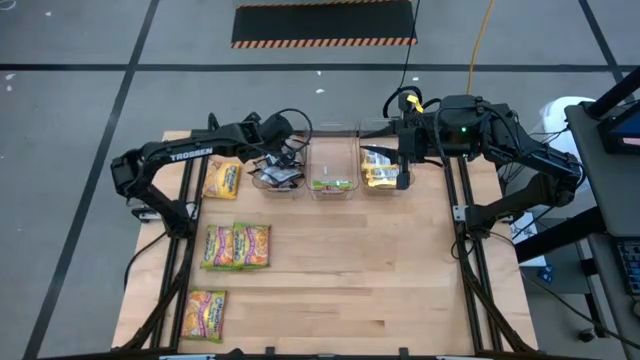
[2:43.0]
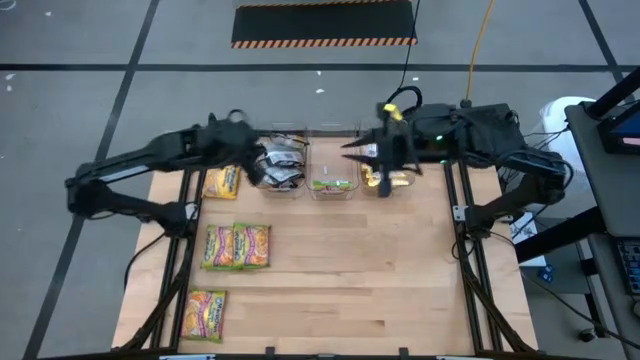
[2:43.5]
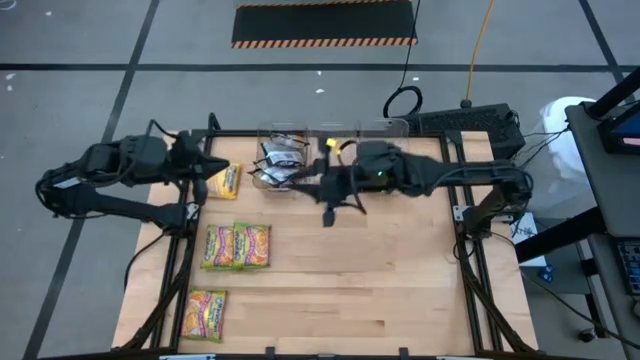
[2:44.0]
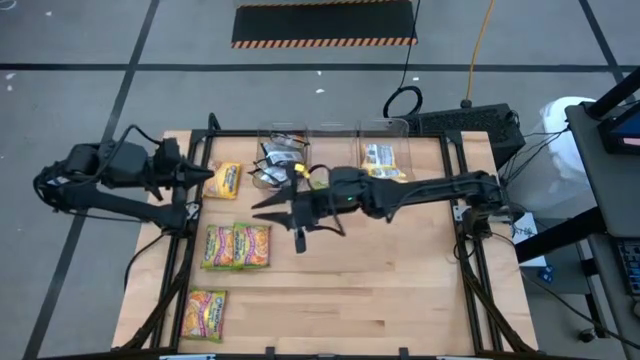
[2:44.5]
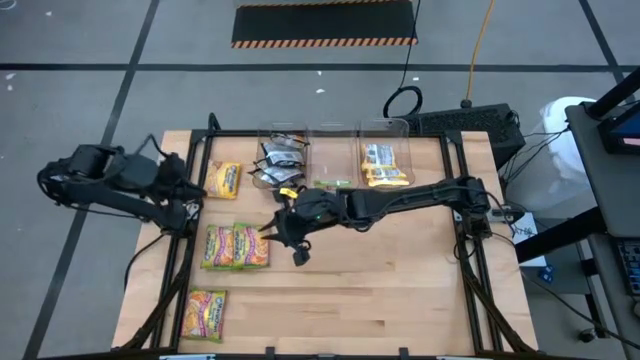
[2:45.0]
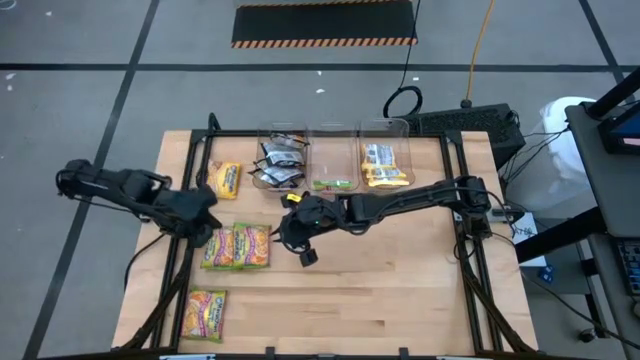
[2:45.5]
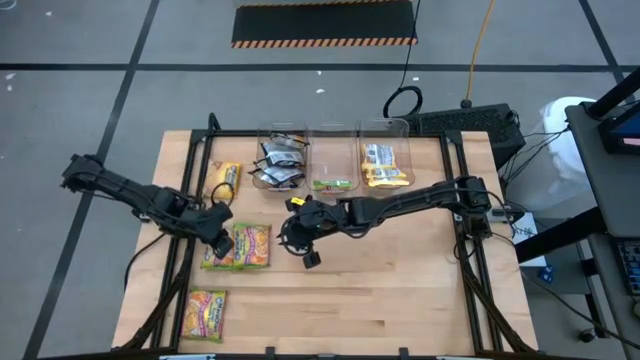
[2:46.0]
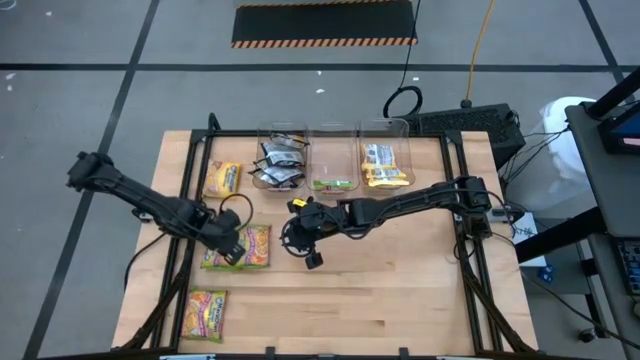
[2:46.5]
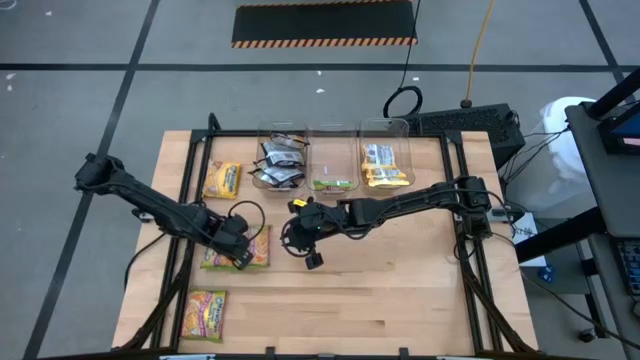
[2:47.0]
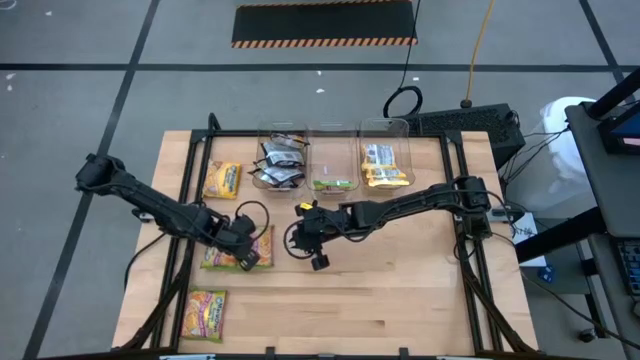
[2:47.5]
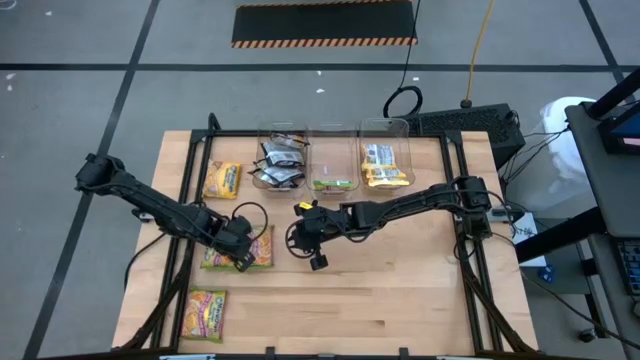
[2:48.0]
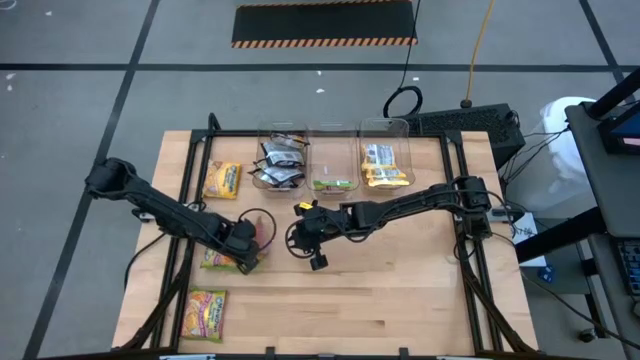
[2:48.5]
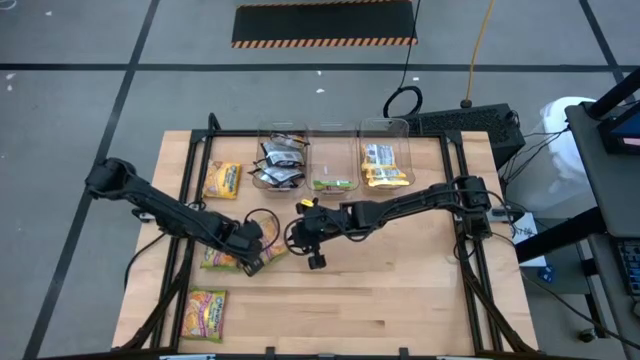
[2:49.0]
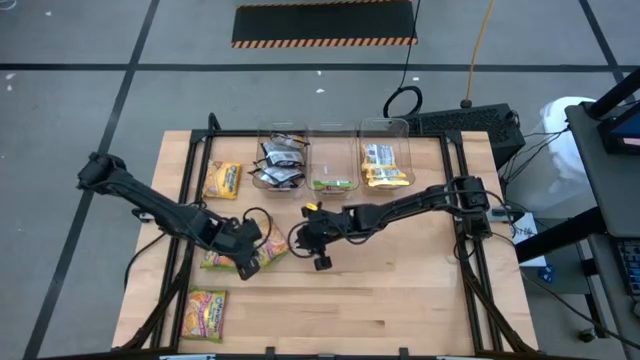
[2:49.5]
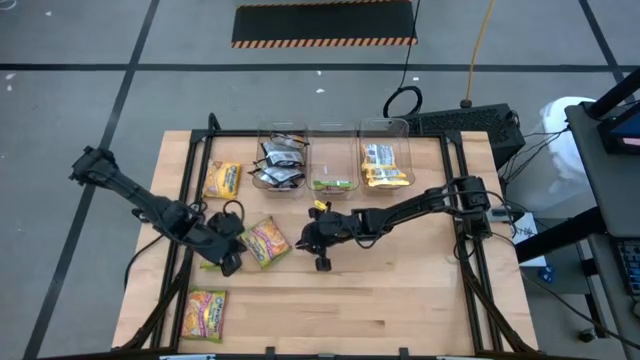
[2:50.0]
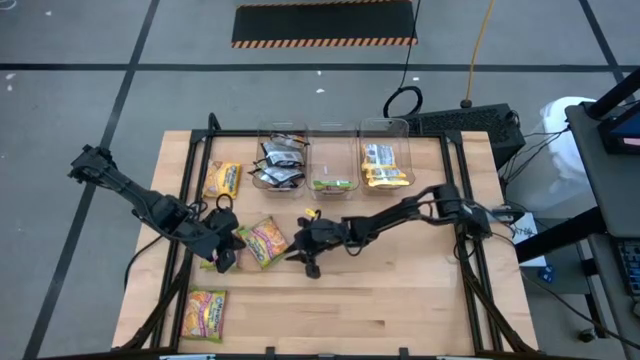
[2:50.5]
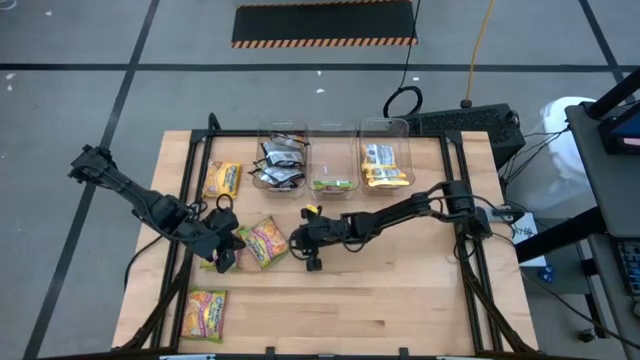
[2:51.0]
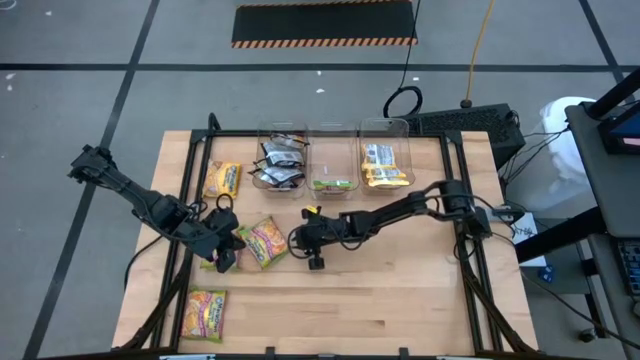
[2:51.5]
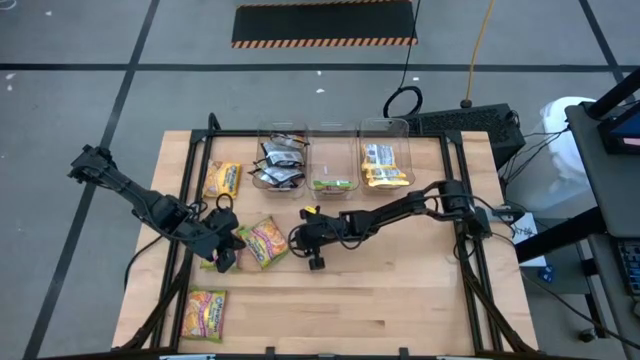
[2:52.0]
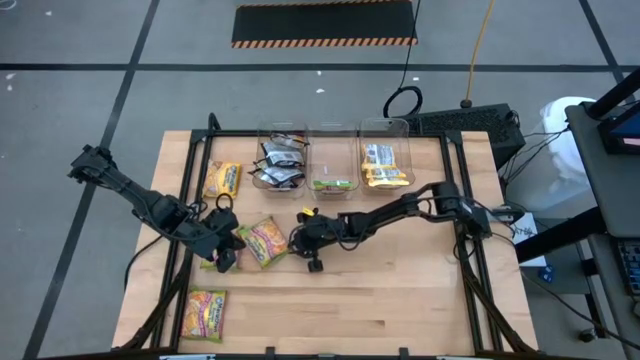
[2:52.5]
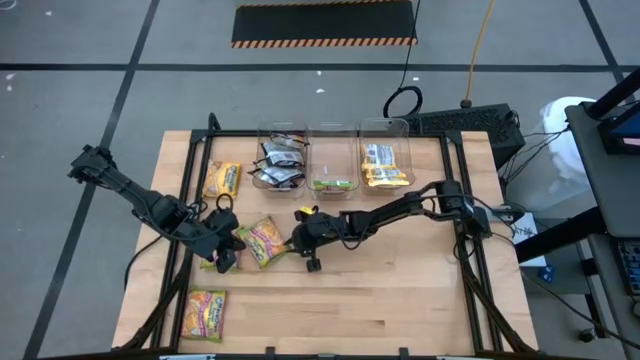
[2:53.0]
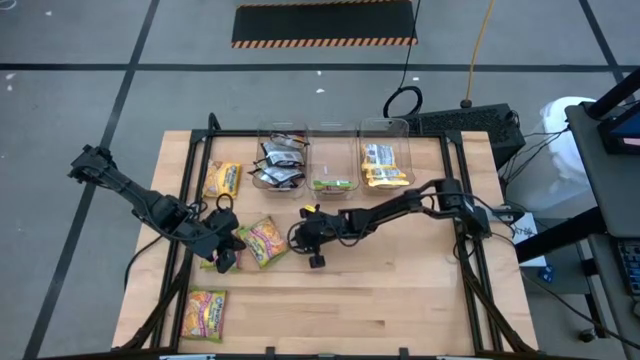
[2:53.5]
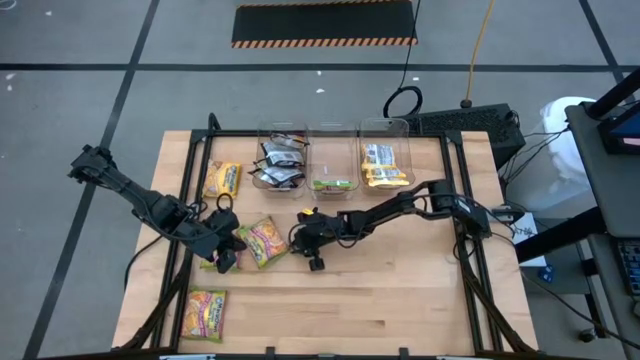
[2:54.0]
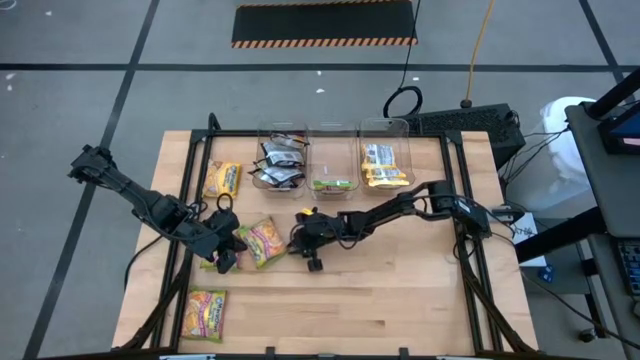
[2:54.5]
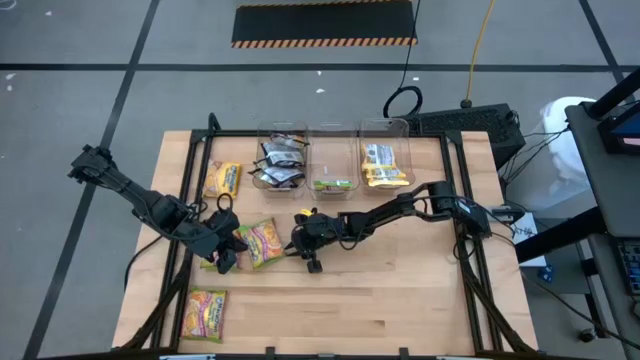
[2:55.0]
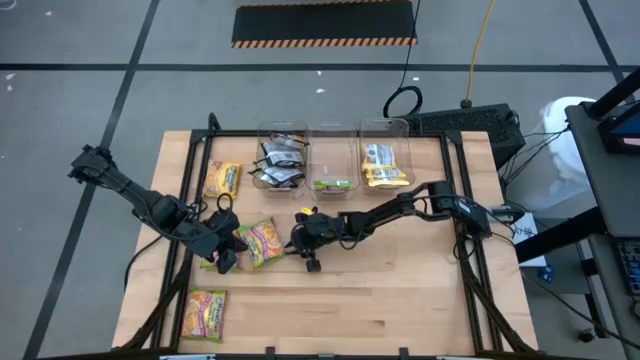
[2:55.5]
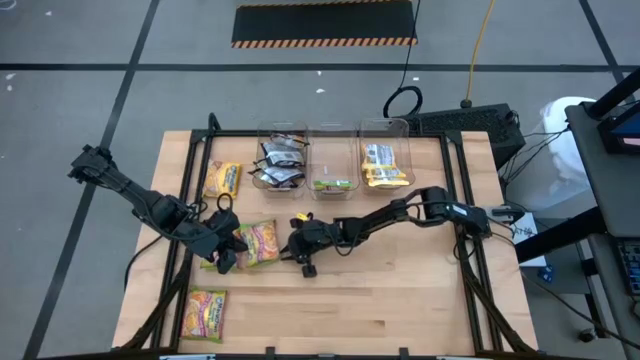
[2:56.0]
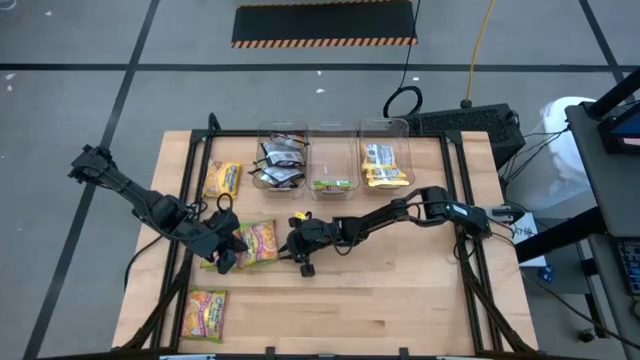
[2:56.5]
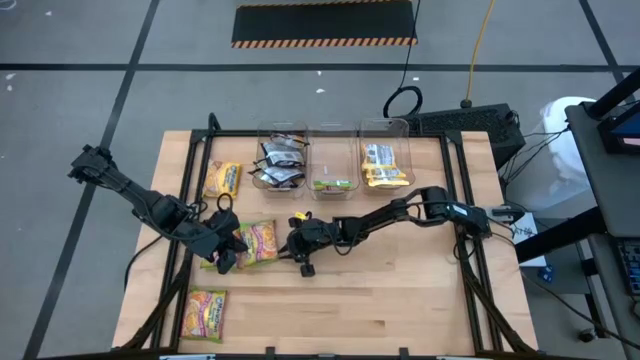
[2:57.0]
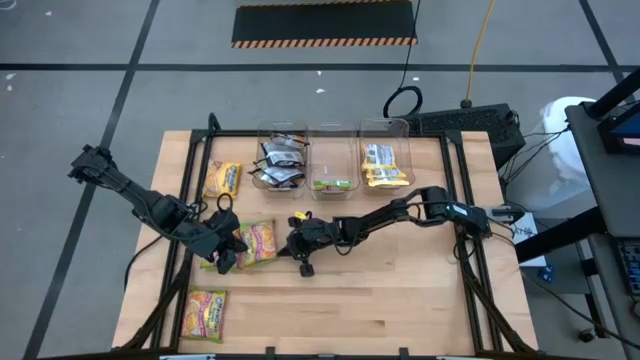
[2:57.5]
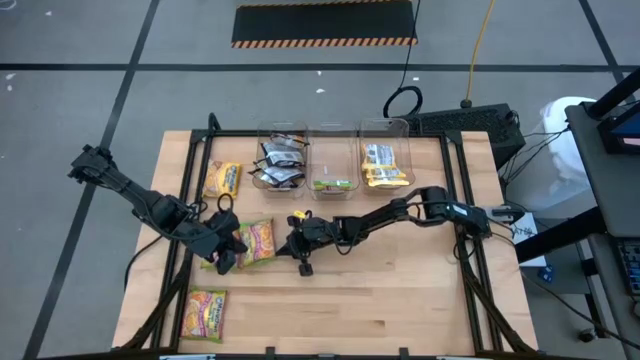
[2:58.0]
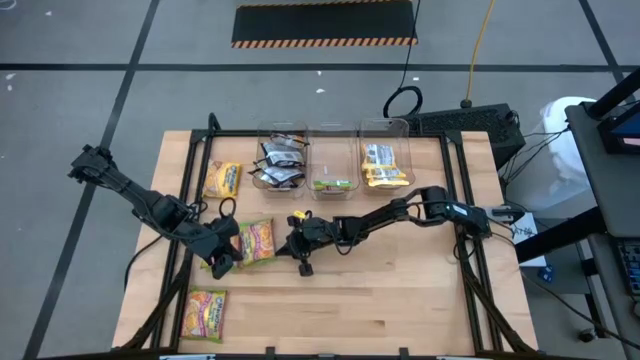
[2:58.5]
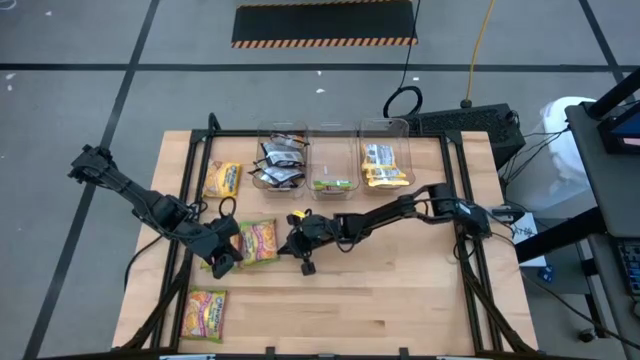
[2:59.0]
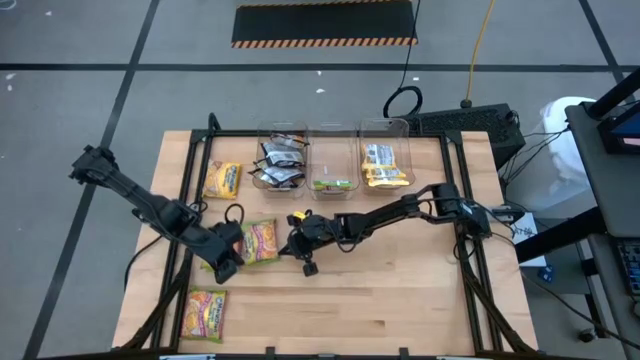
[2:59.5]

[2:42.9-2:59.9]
Task: Sort Maruchan noodles
Put the green noodle pack into the middle transparent bin
